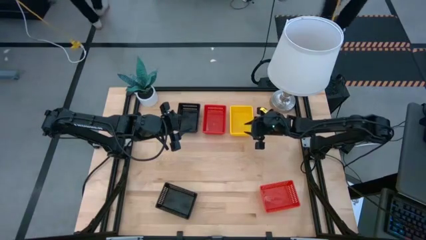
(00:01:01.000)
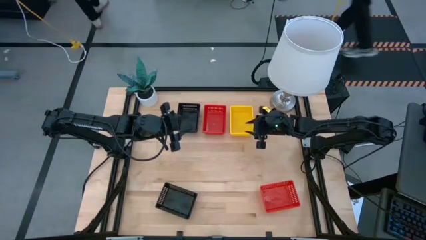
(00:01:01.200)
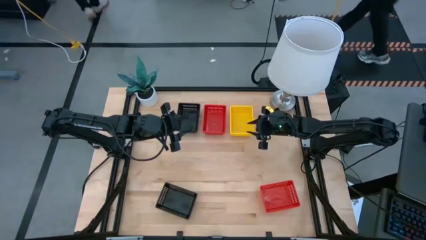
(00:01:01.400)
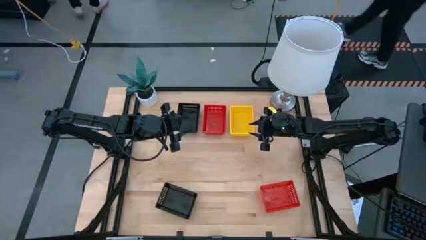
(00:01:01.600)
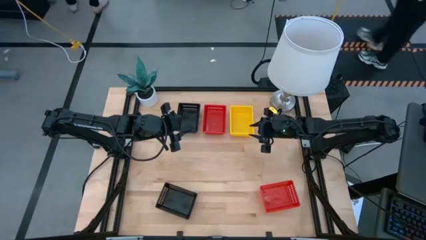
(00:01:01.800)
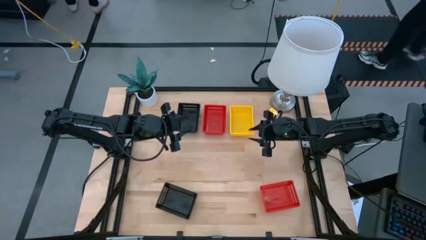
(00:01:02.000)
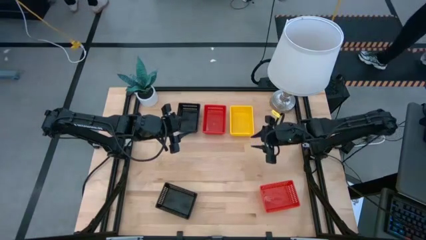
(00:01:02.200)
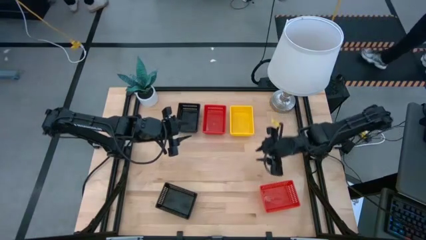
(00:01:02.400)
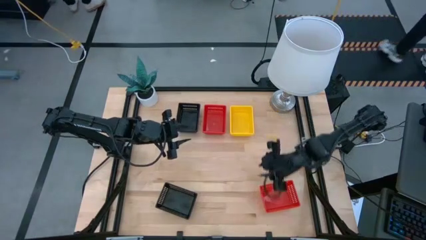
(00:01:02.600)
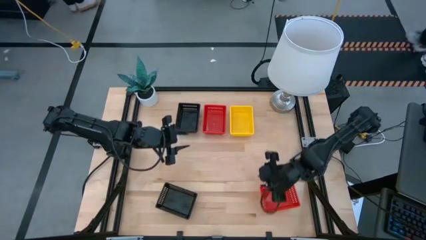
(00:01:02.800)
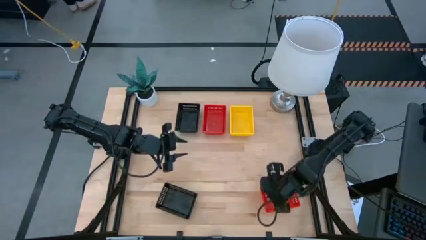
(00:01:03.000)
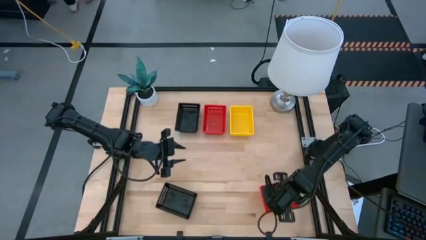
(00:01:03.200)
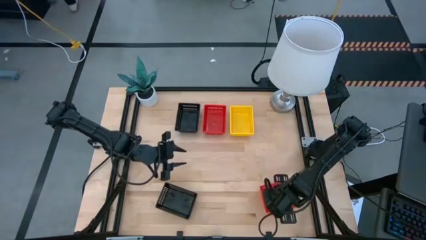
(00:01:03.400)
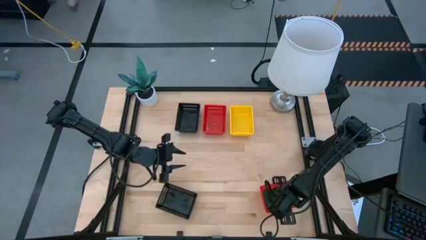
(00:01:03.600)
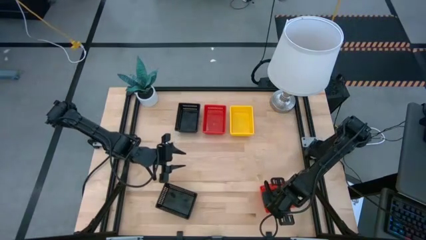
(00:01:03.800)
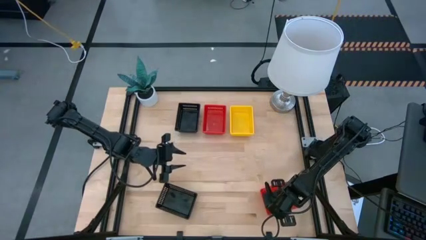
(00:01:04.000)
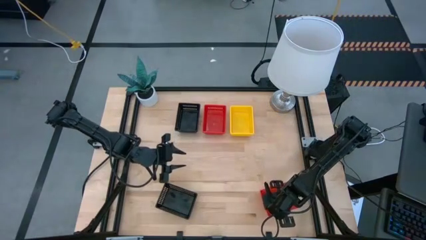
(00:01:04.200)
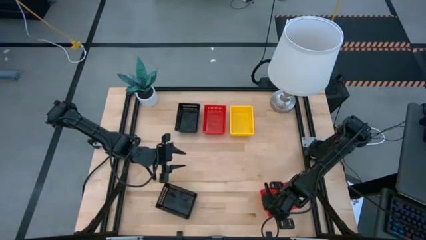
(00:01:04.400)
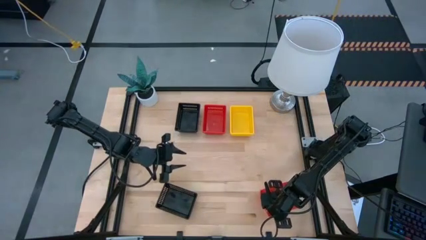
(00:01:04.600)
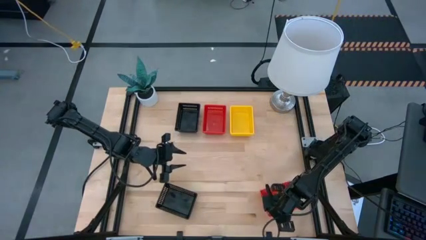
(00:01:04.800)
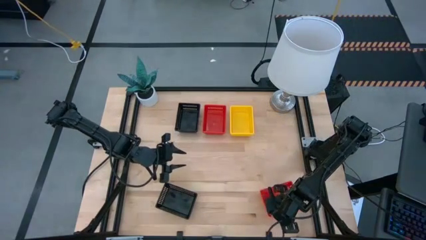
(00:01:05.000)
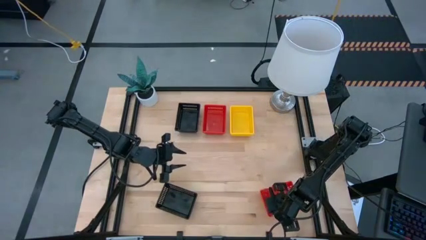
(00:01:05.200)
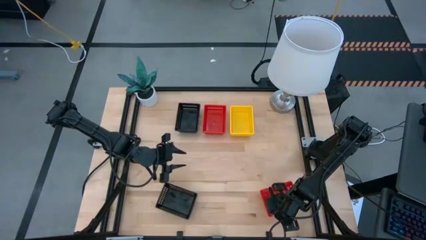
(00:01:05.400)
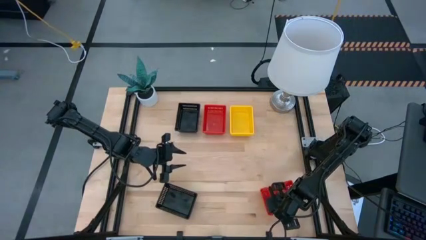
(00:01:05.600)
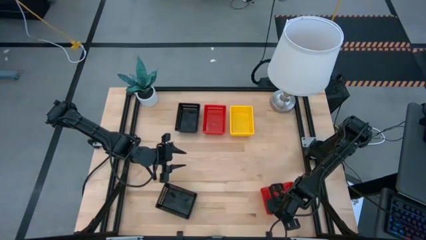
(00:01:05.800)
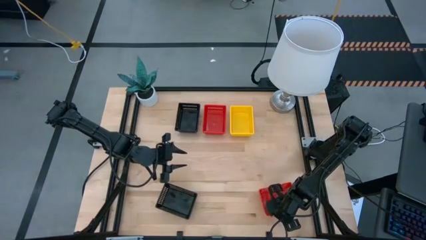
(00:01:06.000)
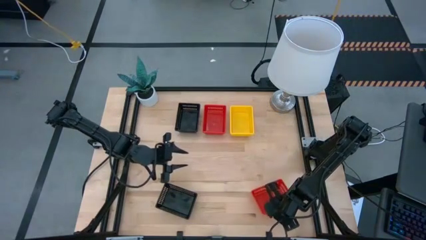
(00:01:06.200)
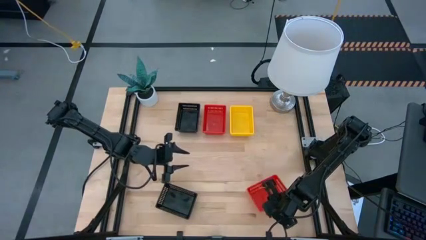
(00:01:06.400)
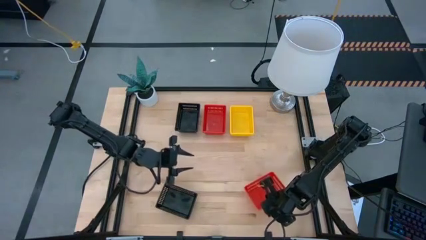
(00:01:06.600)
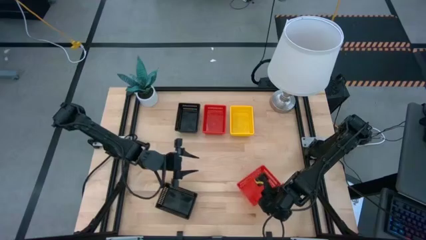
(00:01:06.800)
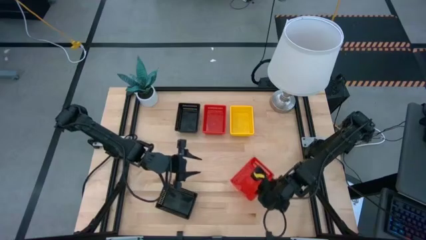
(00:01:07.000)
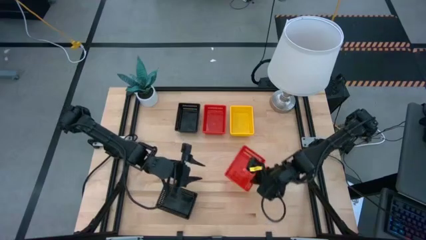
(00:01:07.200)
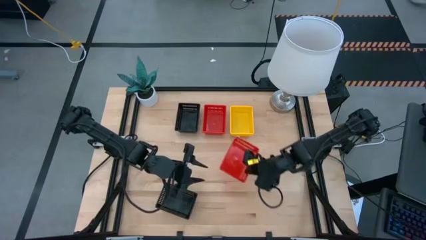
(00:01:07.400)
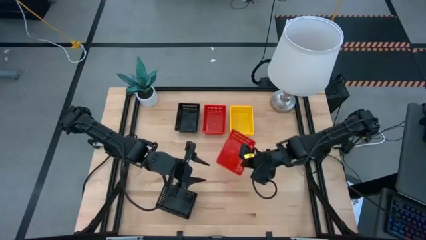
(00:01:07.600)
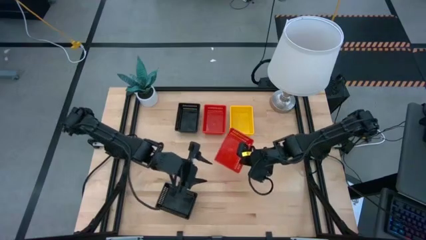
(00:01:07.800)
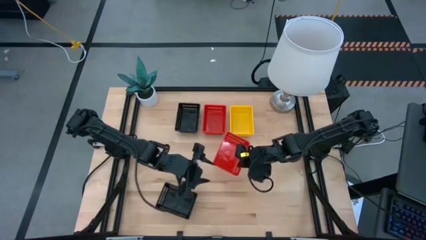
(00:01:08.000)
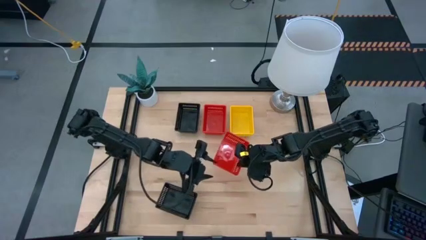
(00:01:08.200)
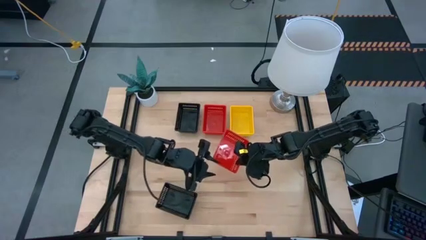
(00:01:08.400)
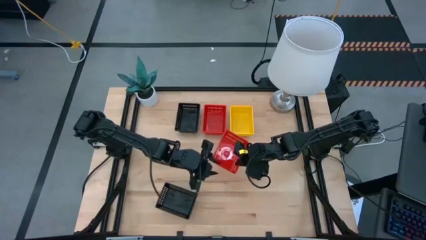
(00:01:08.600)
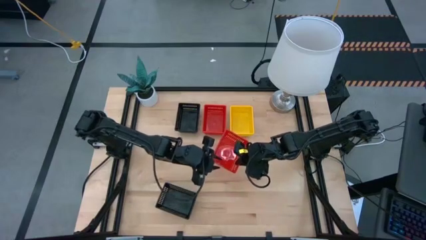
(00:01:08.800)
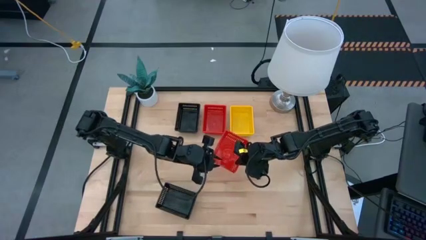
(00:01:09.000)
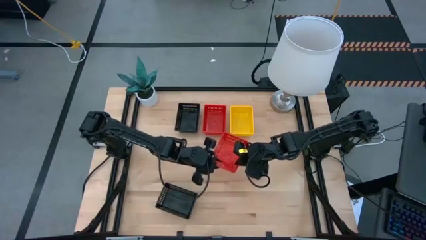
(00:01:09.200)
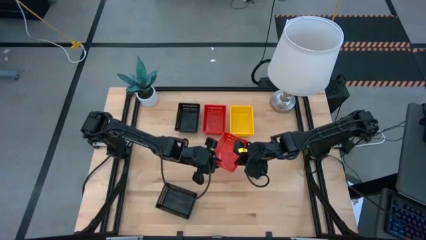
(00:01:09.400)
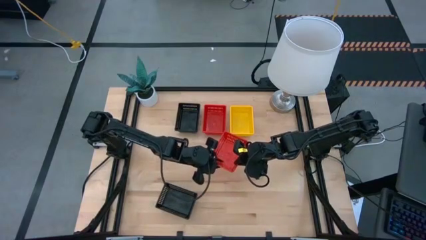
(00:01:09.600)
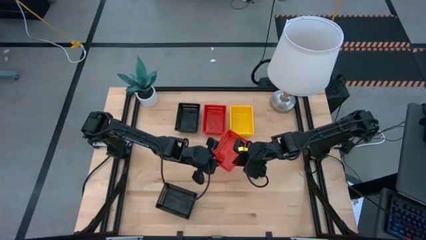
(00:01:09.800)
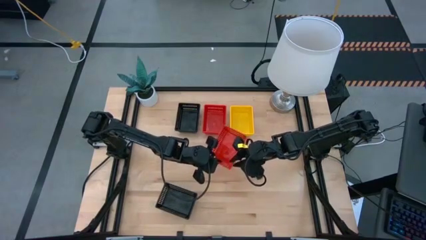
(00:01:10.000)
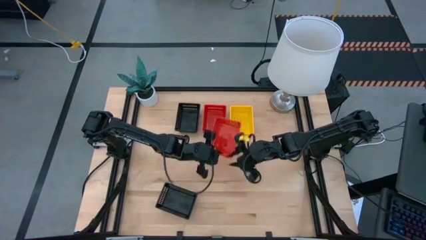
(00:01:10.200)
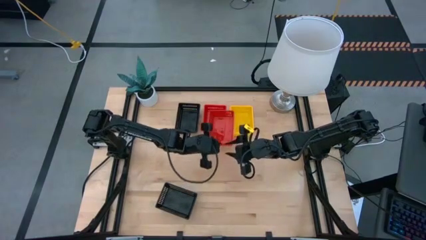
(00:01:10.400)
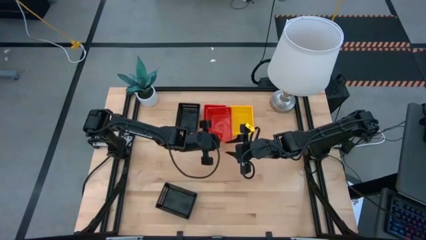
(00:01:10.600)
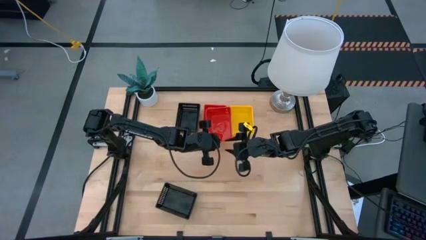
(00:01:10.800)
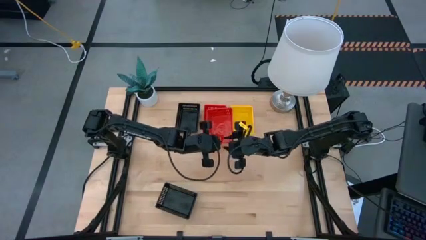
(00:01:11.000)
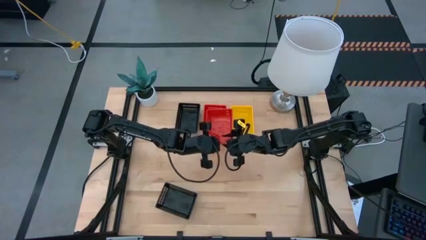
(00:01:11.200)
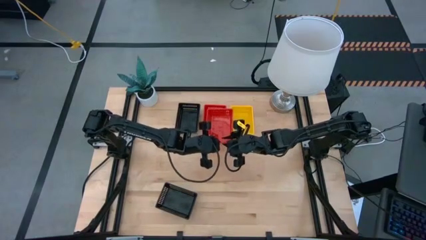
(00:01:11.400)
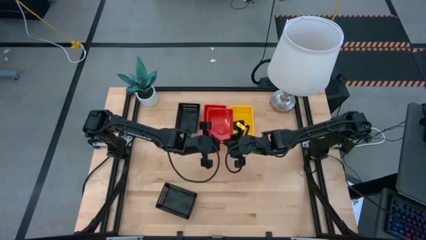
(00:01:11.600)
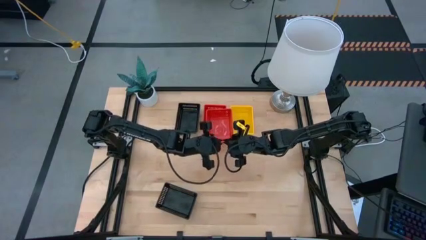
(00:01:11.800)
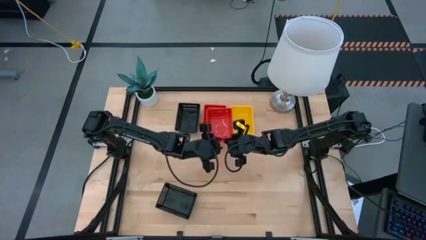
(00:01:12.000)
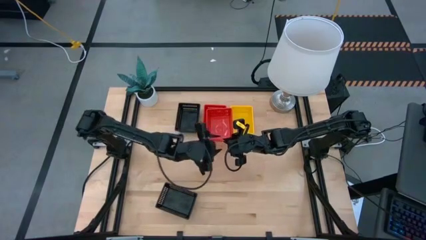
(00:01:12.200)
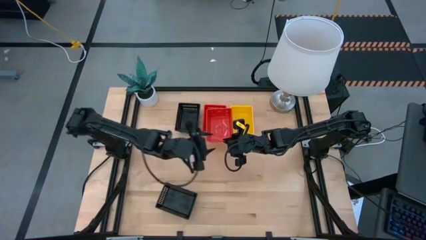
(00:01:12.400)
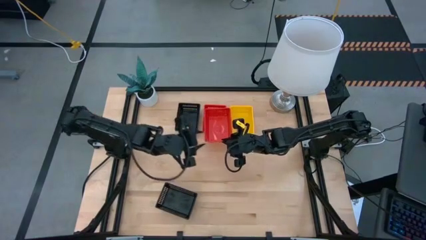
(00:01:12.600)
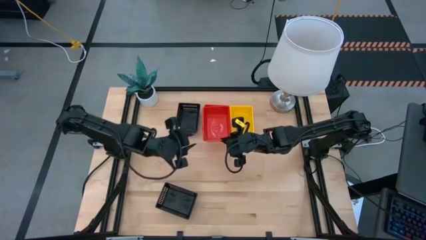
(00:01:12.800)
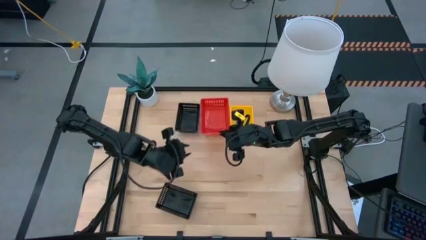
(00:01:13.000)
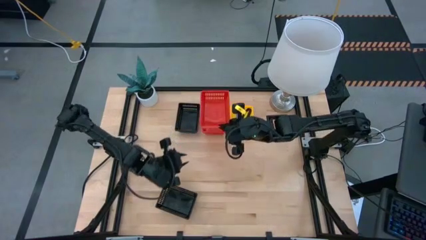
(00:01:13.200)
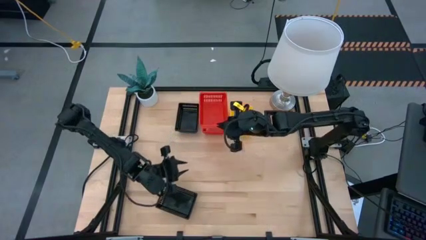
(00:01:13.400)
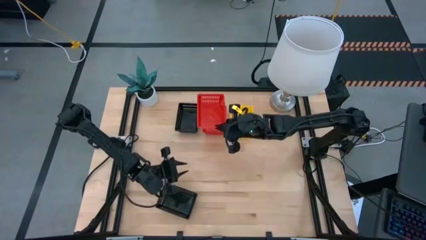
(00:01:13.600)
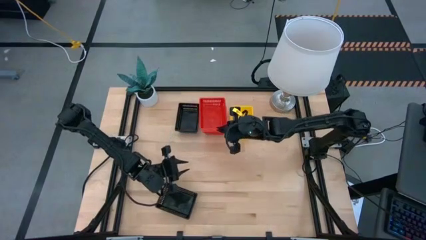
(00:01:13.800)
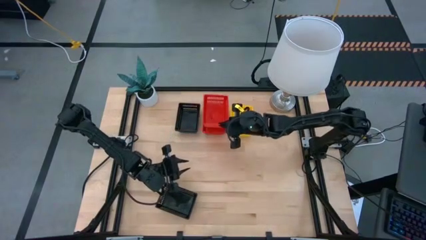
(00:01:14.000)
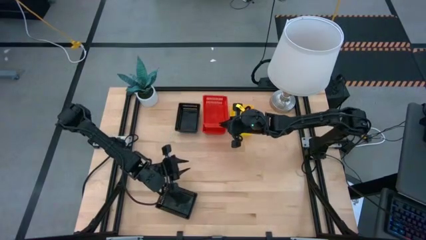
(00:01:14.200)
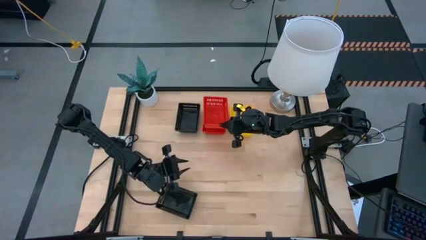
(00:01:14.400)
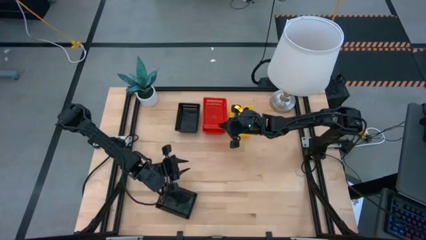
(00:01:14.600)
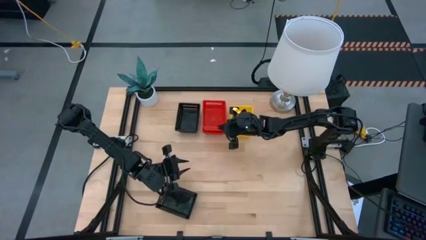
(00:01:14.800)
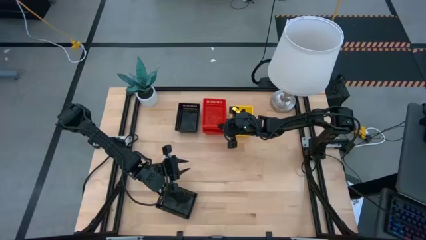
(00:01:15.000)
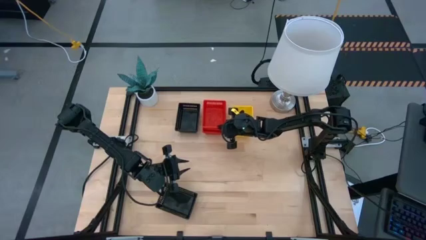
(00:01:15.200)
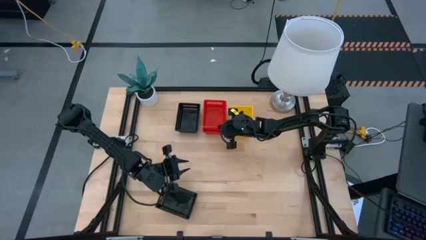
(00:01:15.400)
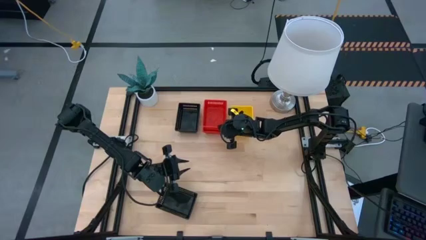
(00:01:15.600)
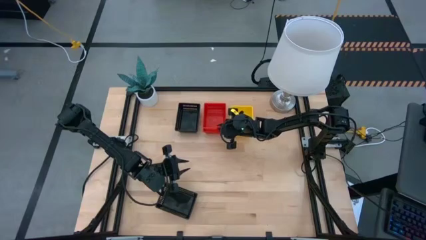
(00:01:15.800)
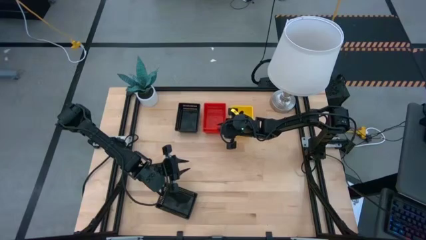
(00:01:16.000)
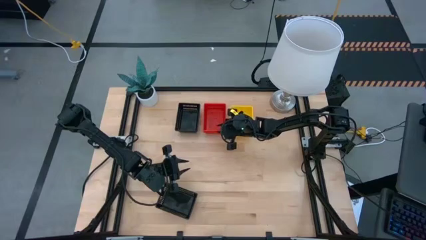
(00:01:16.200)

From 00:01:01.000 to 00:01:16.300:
Stack the bottom red bin on the stacked red bins
